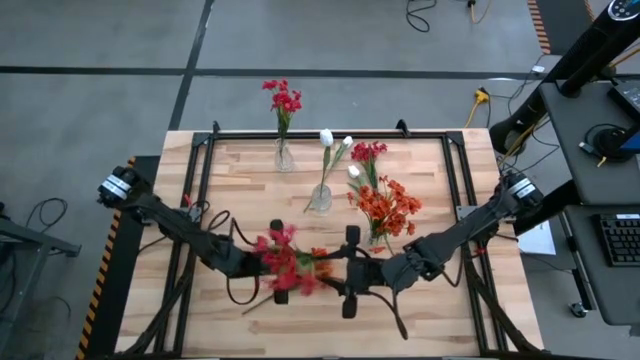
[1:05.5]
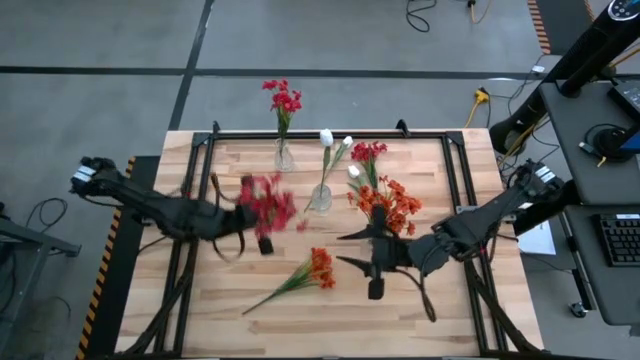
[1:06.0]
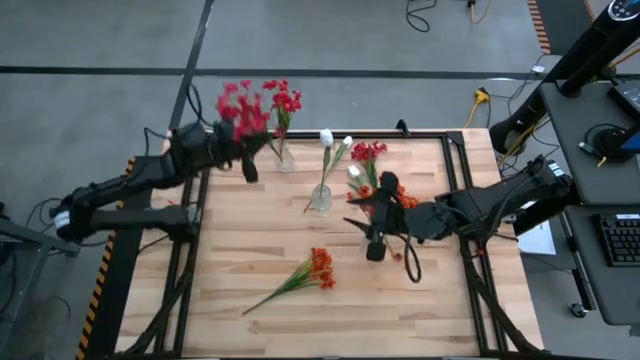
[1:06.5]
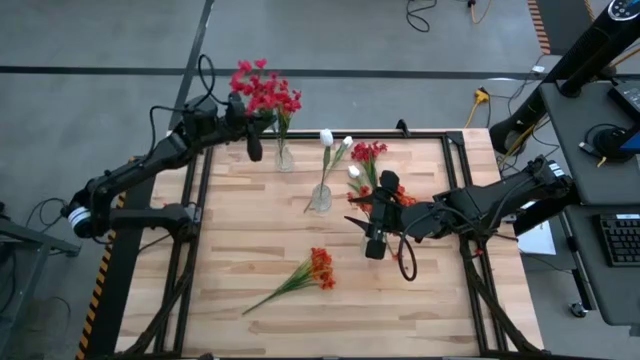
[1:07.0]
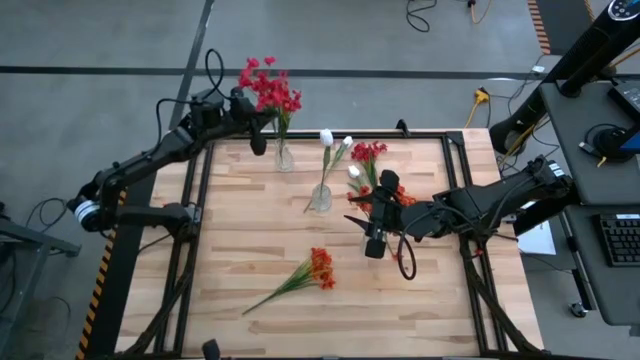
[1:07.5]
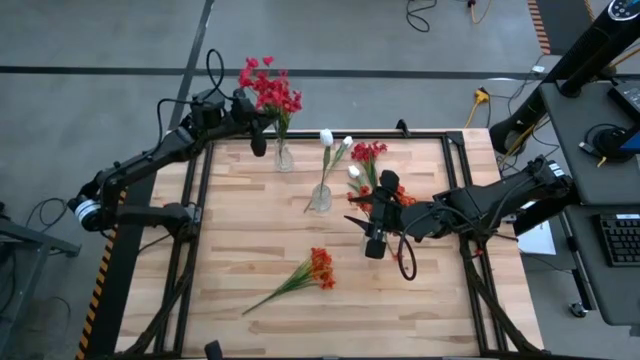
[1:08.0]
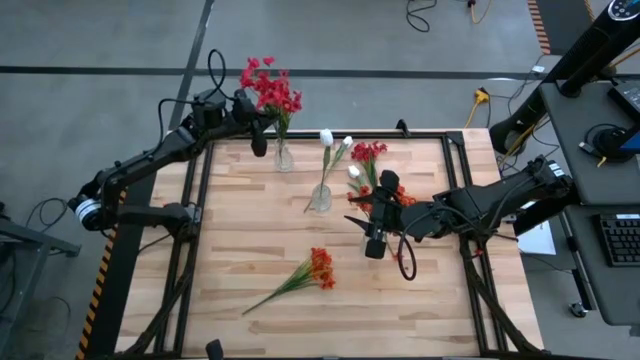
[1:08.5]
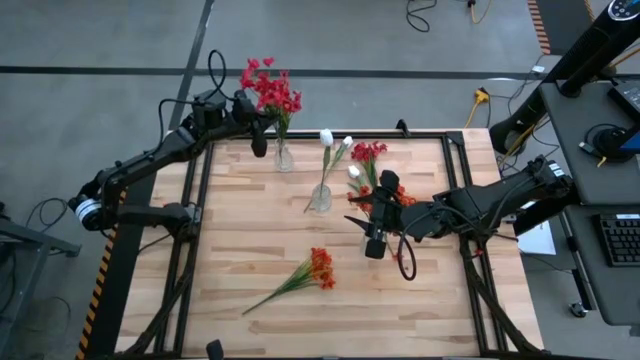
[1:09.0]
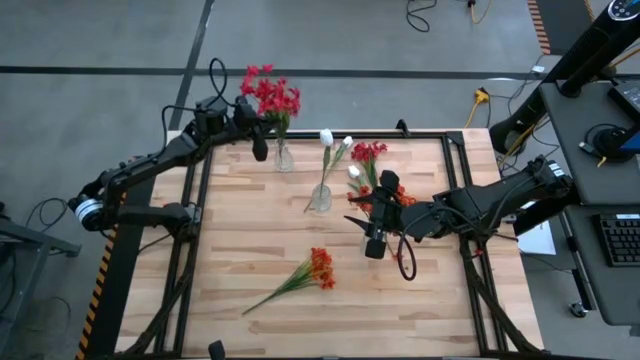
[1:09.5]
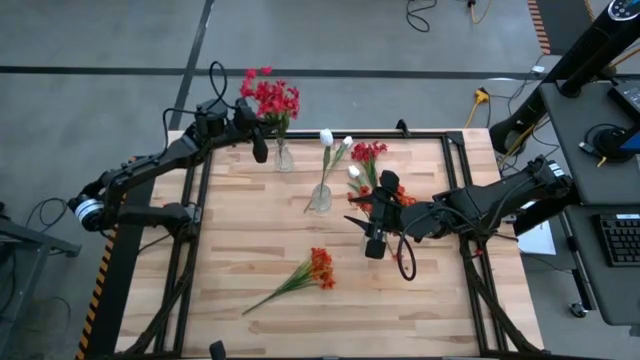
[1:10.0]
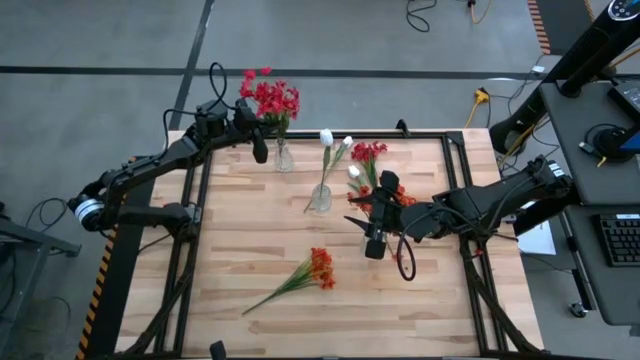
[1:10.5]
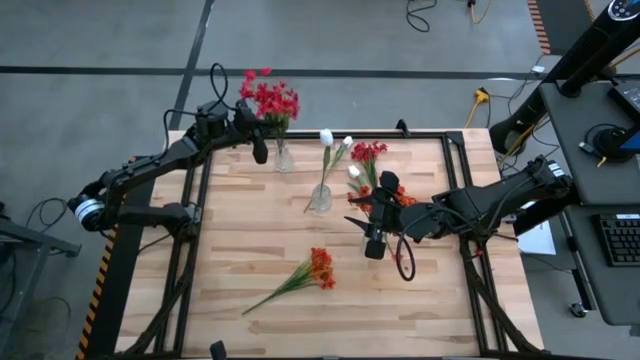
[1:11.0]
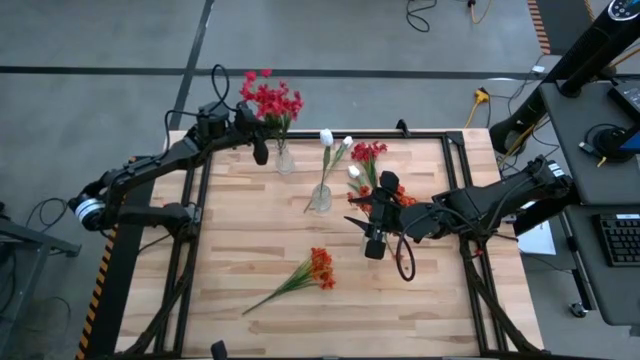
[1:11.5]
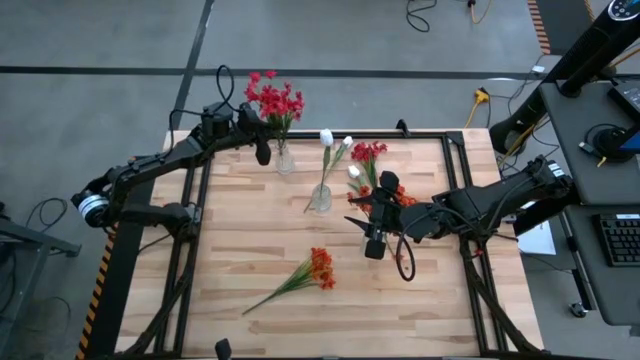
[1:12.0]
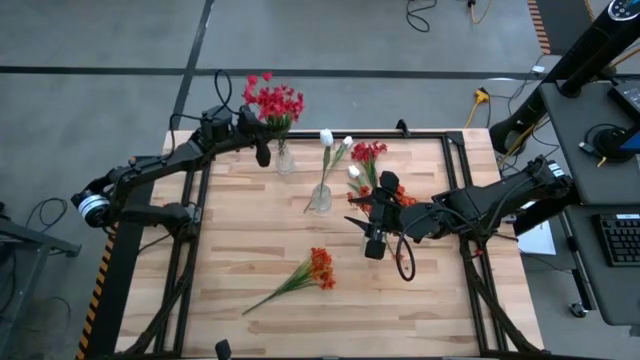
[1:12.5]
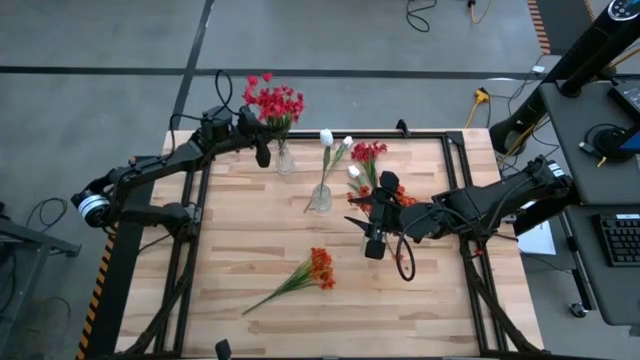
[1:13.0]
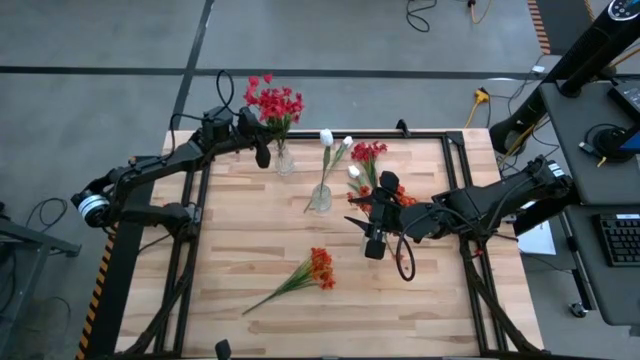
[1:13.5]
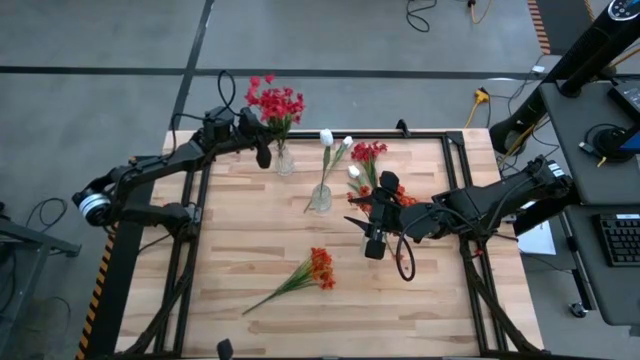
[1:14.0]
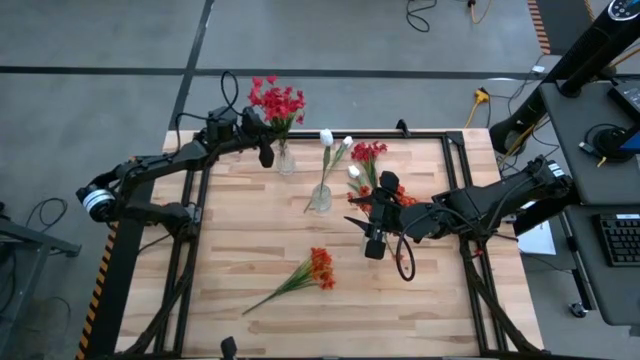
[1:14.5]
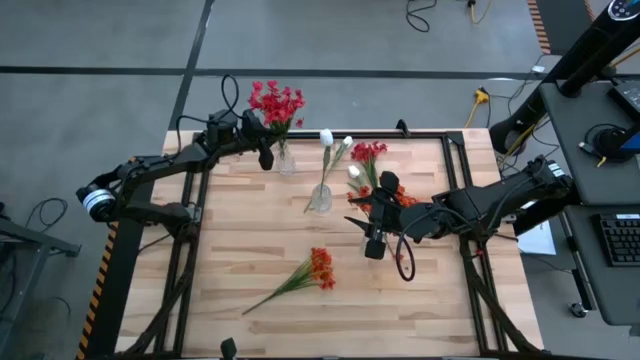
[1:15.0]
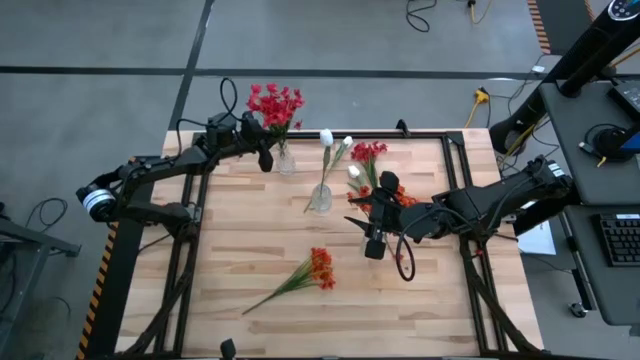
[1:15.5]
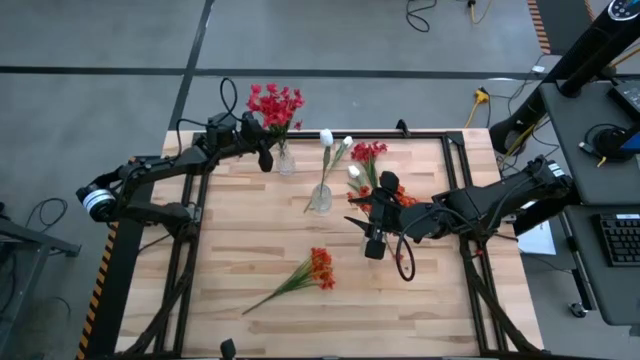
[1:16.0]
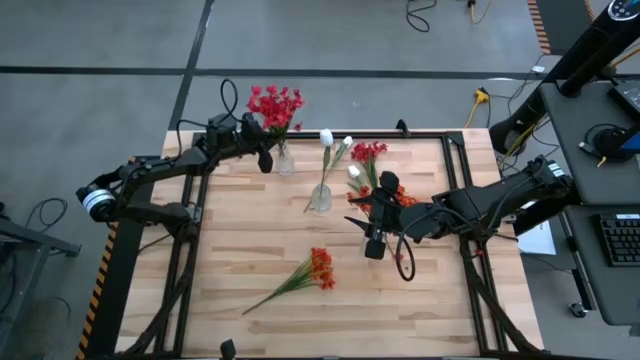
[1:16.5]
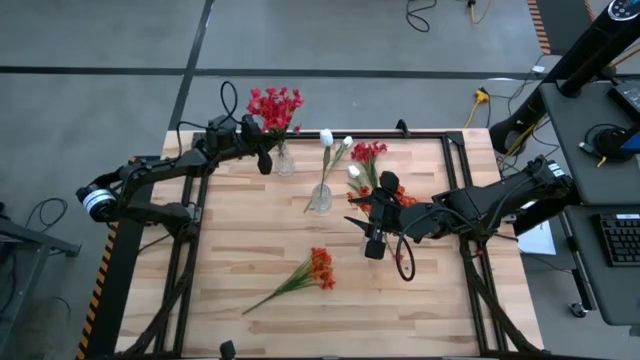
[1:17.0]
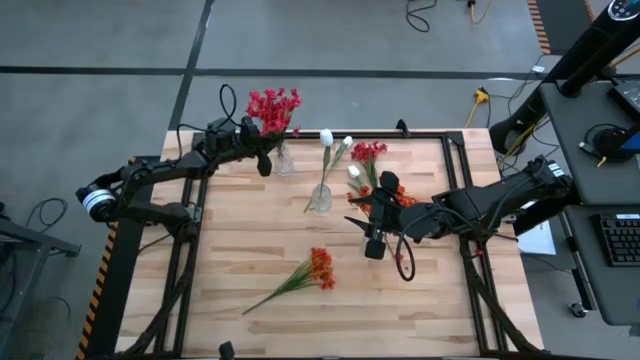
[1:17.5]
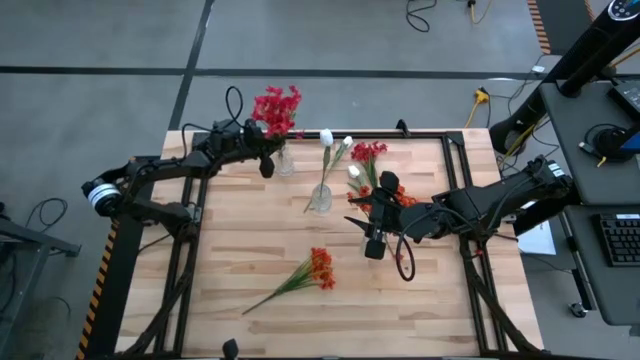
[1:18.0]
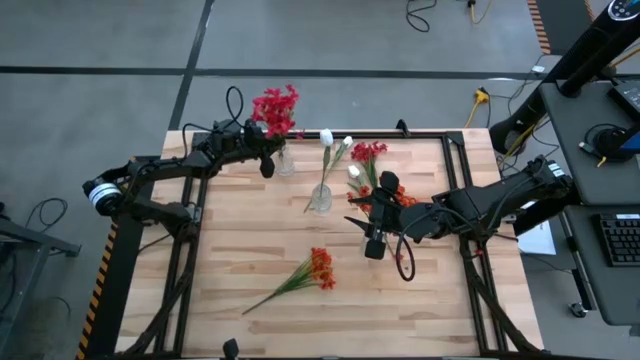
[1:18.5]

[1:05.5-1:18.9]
Task: Sort flowers into vase by color
Put the middle right red sprig flower into the top left transparent glass vase

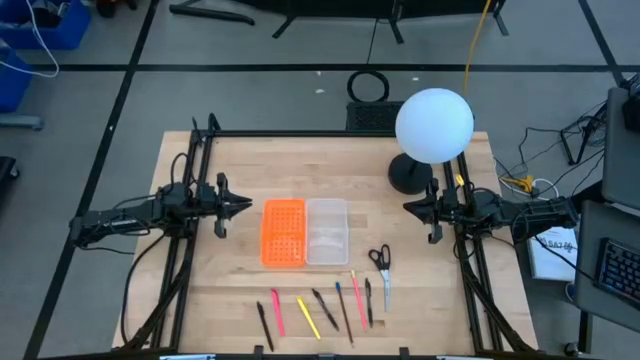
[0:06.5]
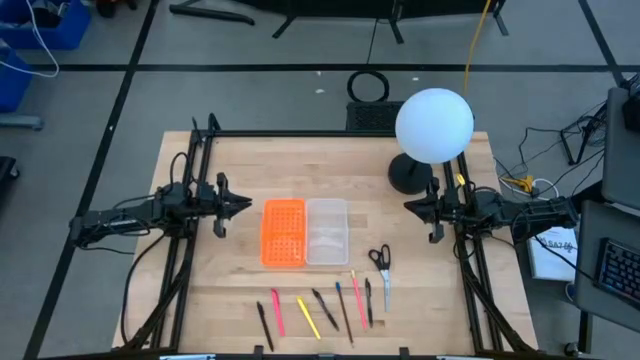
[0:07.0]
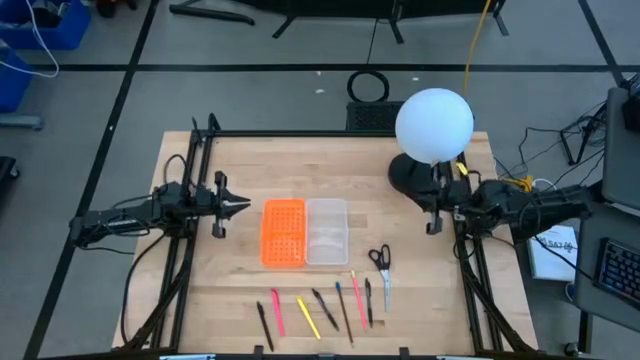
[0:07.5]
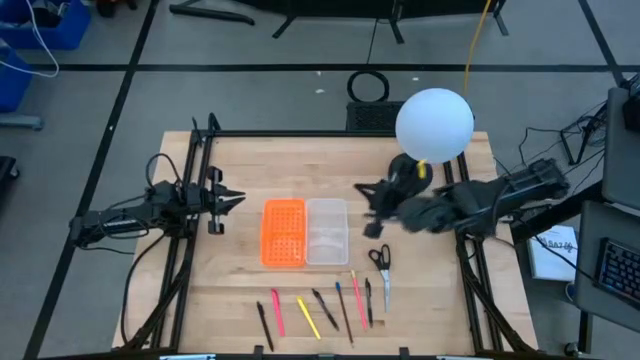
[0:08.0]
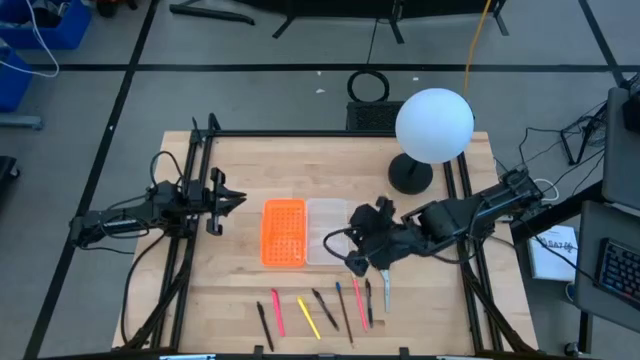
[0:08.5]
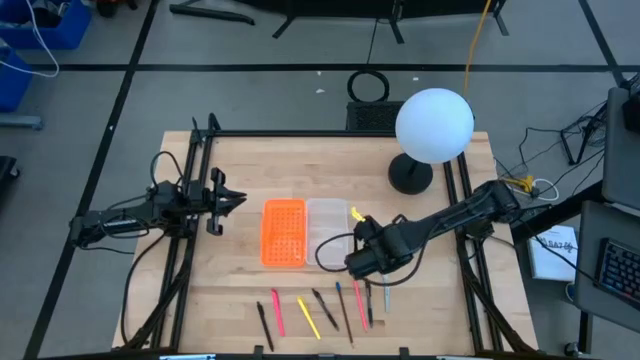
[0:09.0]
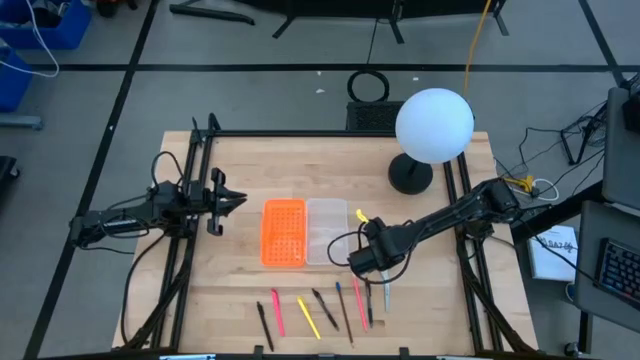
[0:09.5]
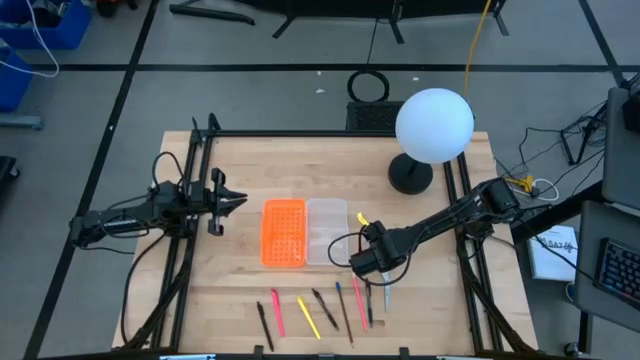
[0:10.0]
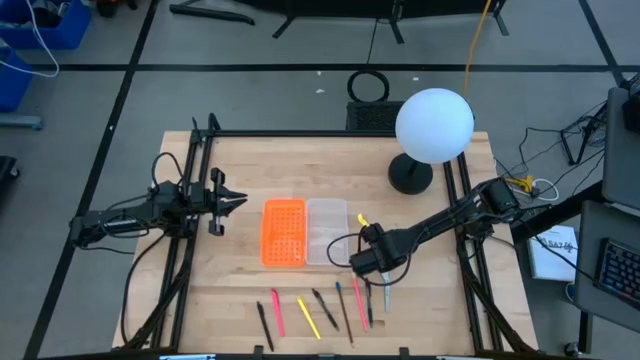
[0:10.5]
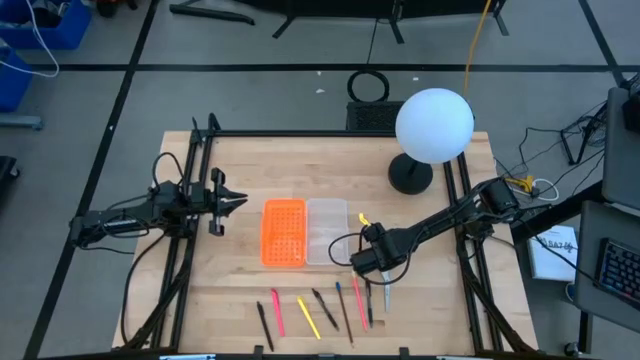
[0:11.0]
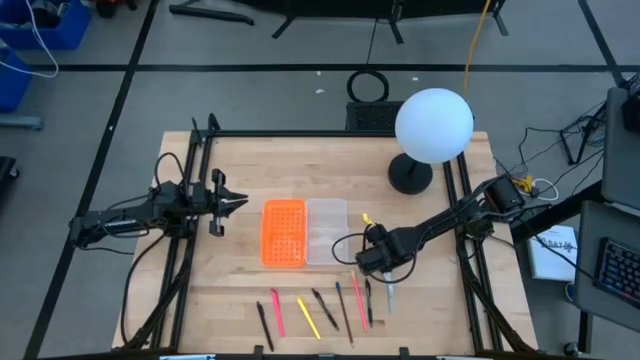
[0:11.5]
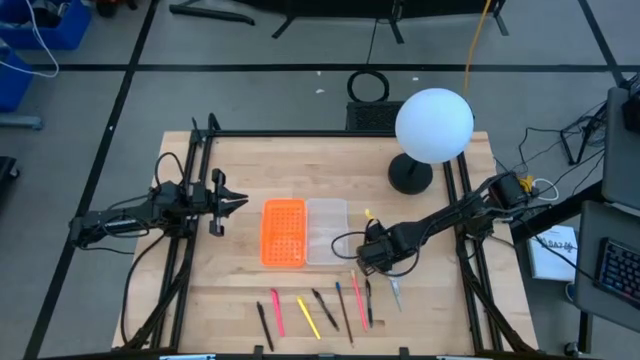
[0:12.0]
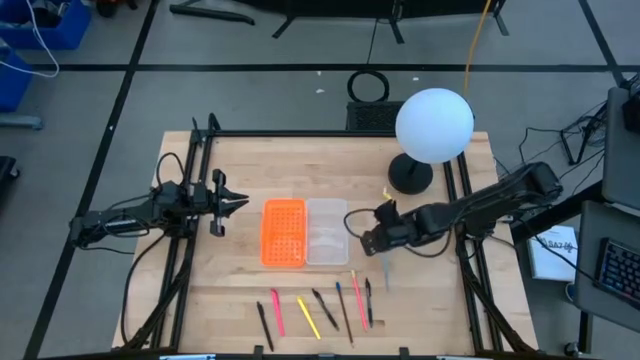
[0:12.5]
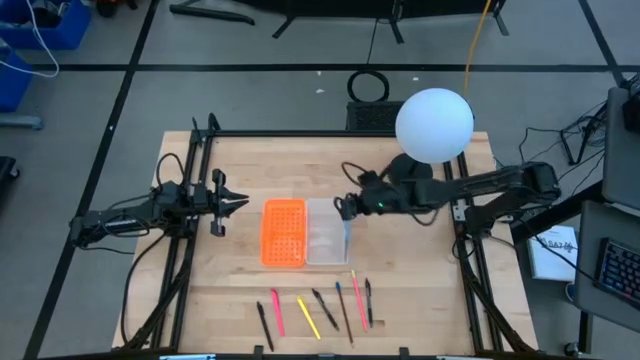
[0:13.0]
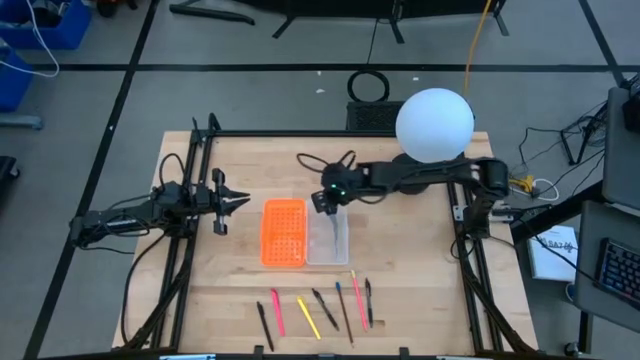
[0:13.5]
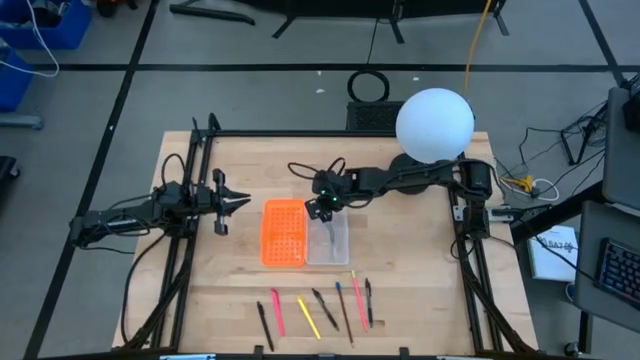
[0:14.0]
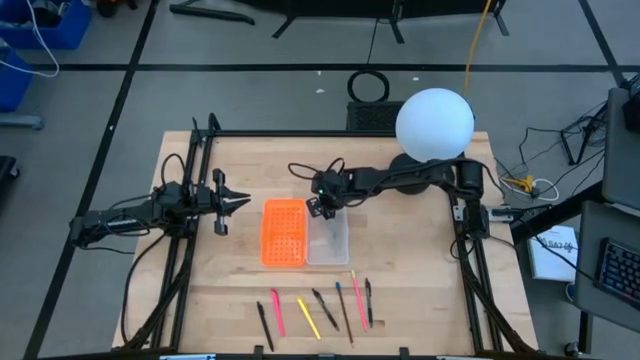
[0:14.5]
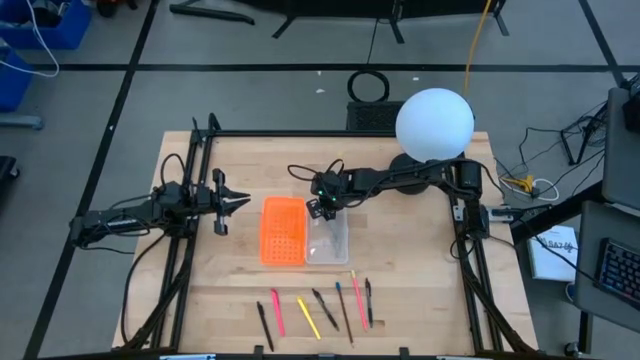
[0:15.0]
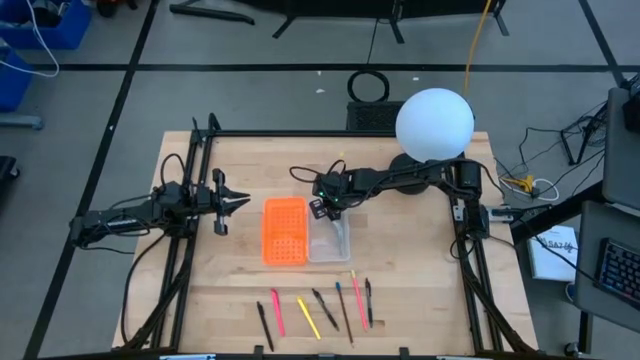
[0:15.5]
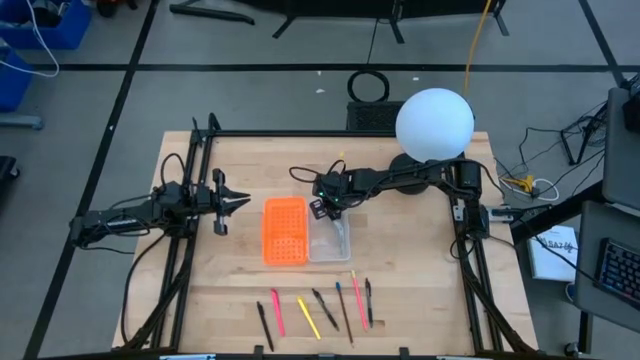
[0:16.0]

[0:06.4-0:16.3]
Task: Pick & place school supplies into a supply box
Put the black scissor into the transparent supply box
